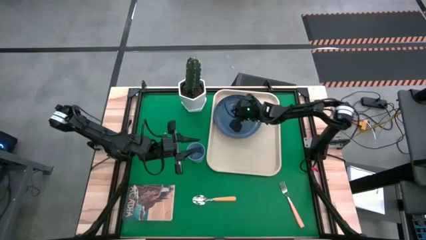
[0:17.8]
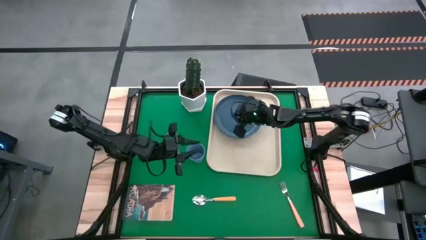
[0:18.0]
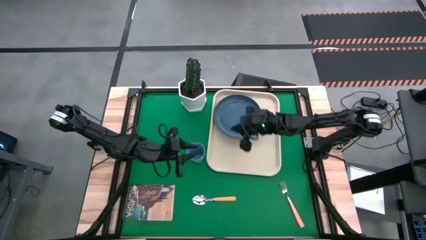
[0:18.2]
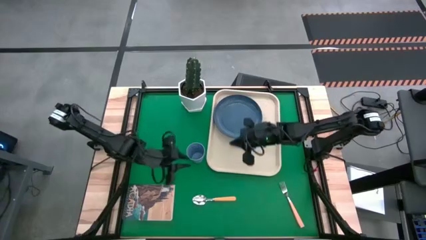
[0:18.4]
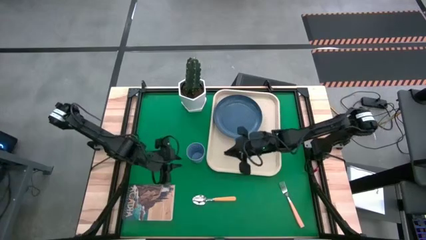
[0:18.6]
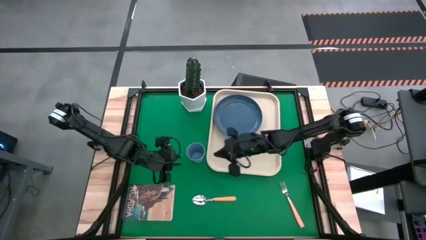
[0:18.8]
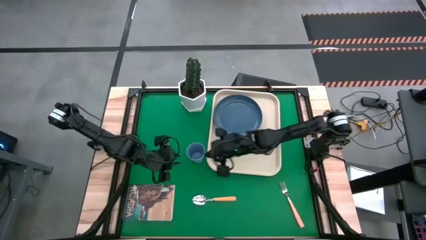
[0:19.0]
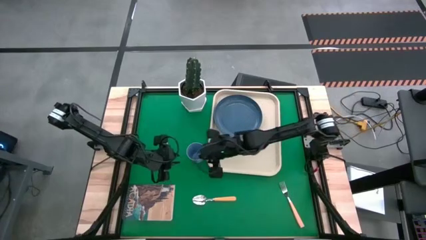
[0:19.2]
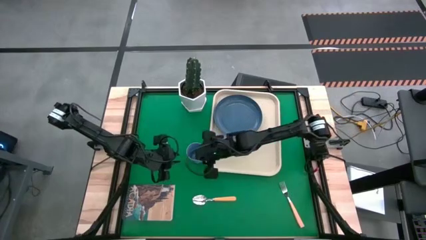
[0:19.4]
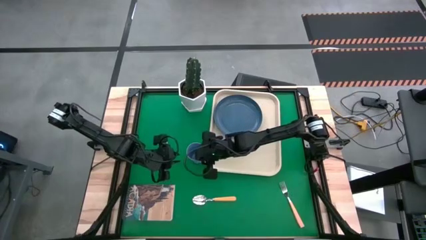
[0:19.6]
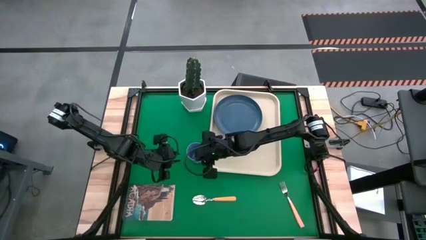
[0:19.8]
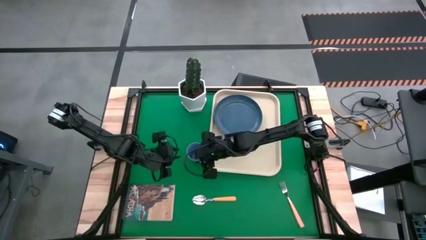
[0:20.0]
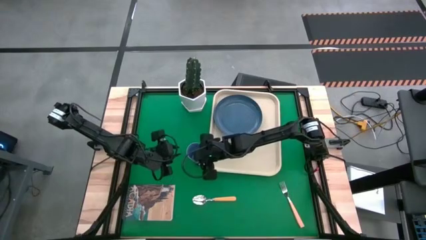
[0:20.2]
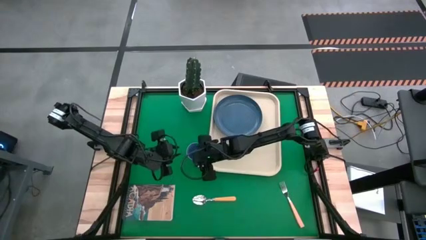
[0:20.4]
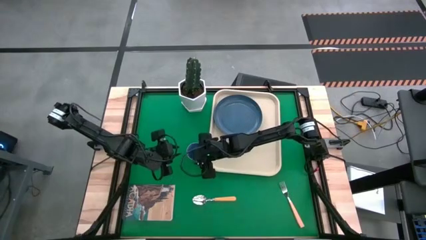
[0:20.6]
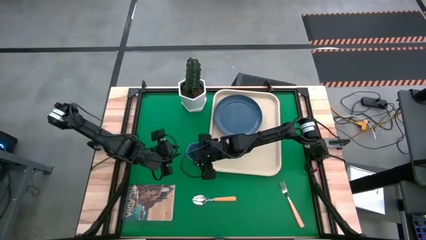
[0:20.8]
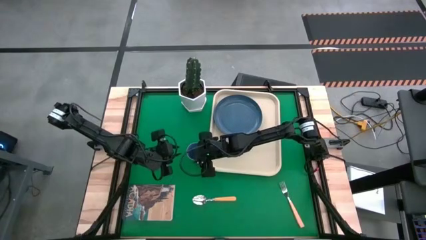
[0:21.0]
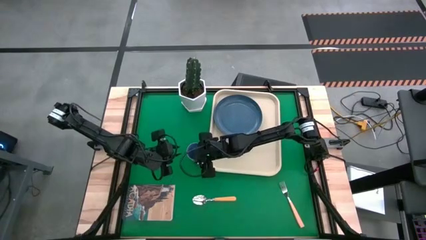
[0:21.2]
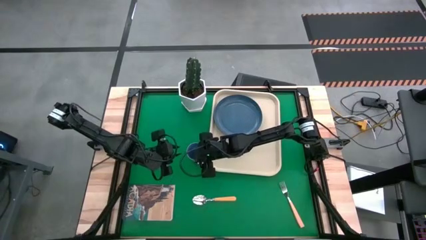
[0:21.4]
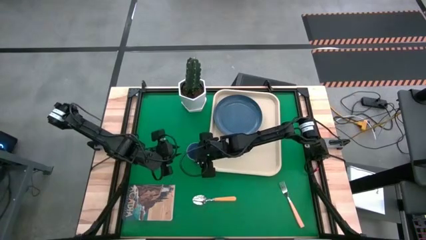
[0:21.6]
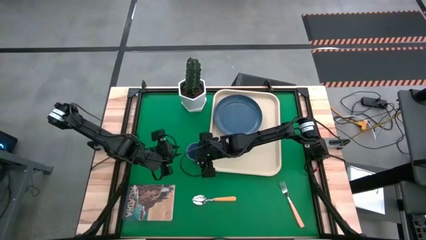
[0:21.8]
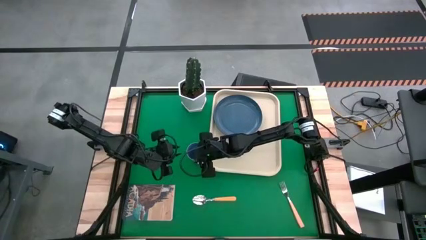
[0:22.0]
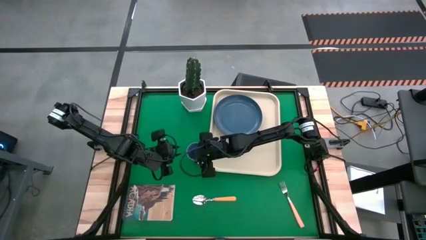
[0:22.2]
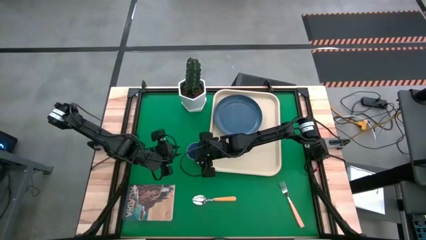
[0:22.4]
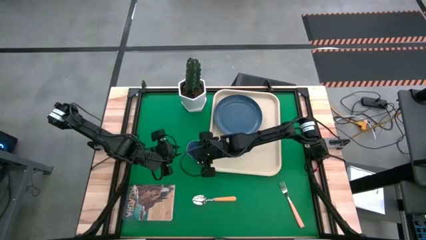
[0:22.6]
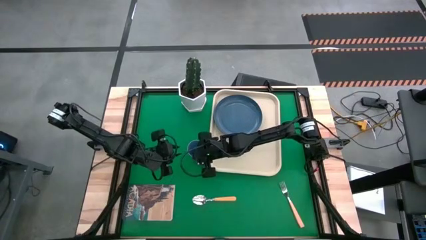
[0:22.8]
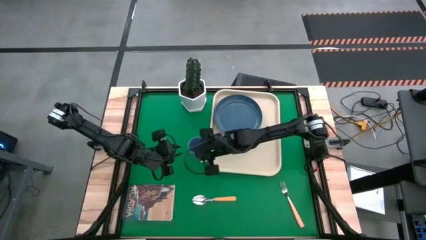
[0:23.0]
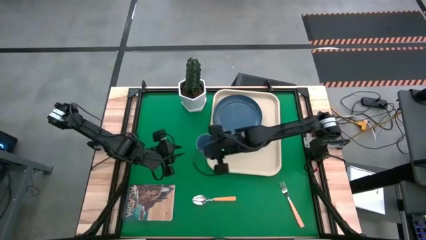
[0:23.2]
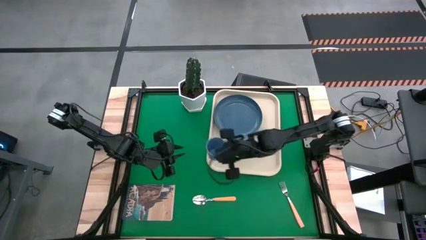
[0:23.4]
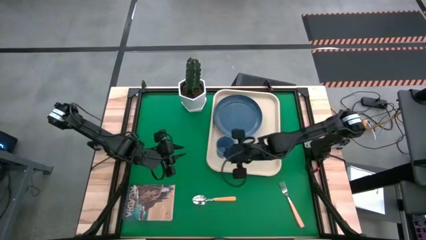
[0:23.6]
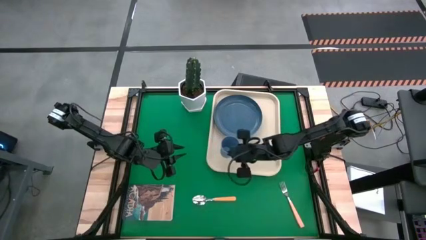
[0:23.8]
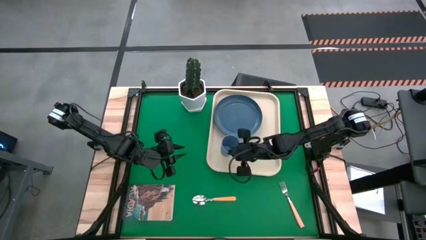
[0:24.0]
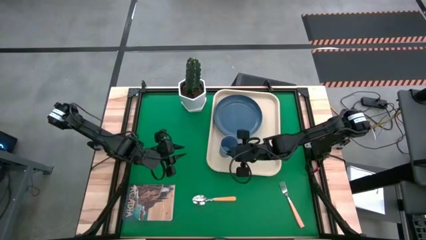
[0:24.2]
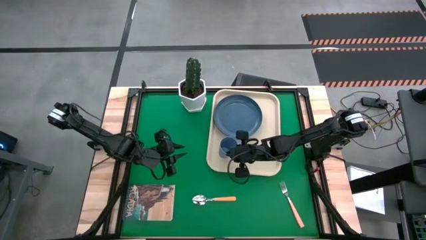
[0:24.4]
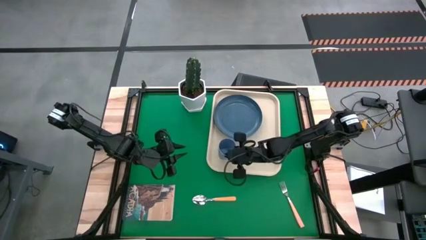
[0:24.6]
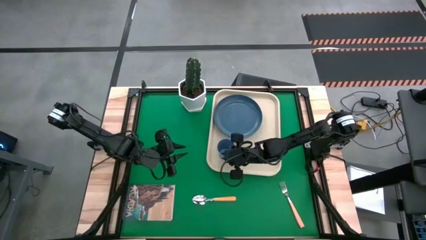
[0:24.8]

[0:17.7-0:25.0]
Task: Pick and place plate/cup/fork/spoon on tray
Put the blue cup on the white serving tray at the bottom of the blue plate

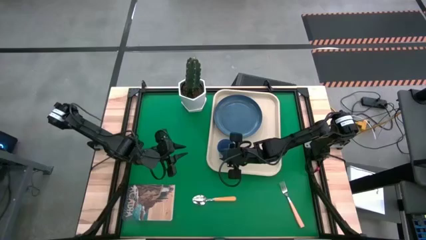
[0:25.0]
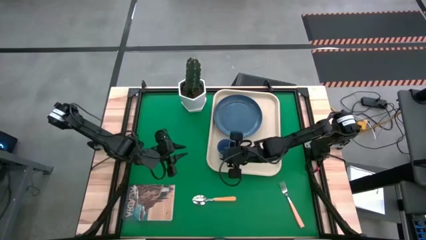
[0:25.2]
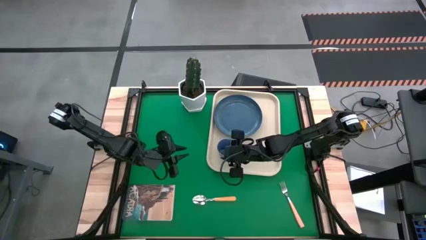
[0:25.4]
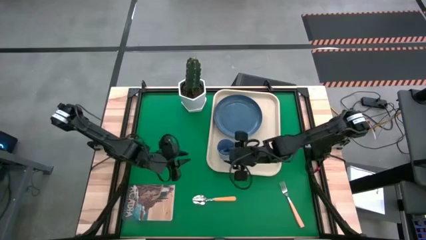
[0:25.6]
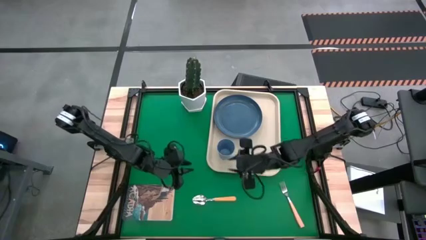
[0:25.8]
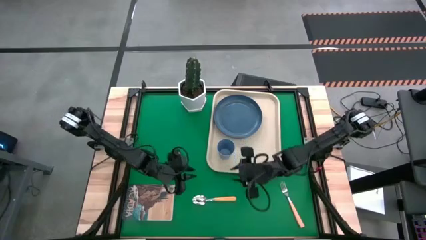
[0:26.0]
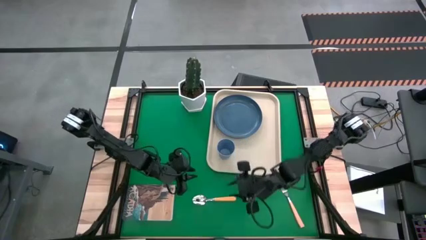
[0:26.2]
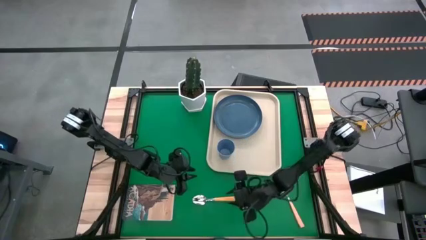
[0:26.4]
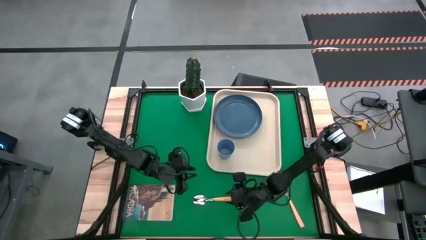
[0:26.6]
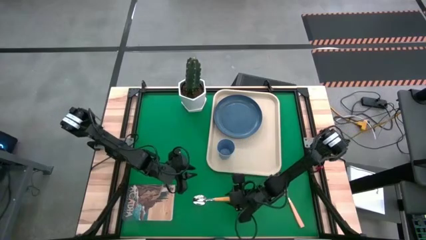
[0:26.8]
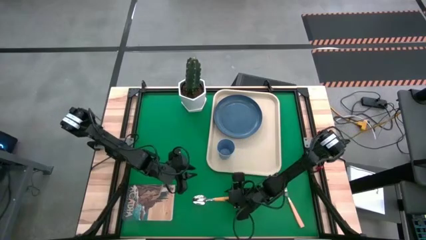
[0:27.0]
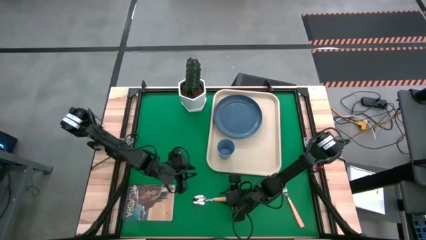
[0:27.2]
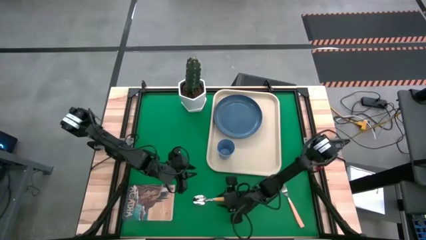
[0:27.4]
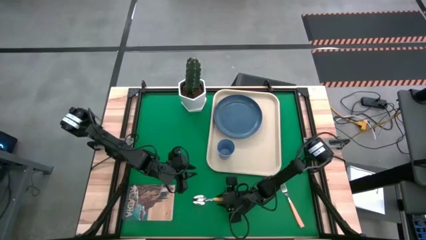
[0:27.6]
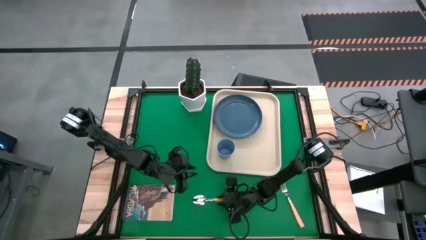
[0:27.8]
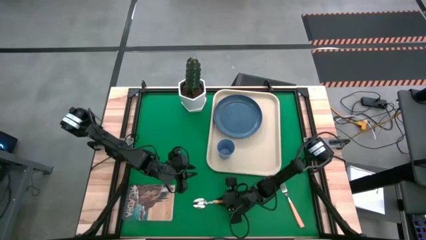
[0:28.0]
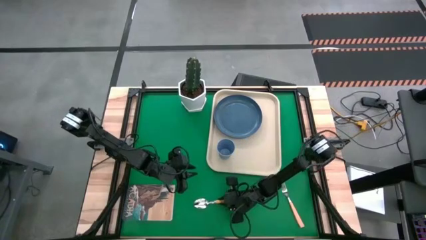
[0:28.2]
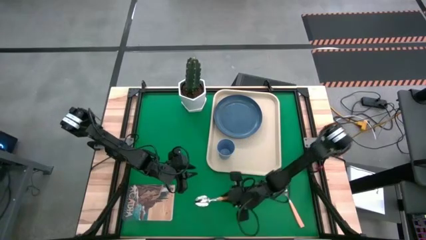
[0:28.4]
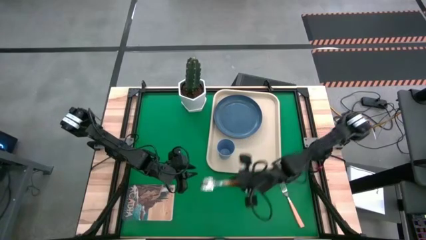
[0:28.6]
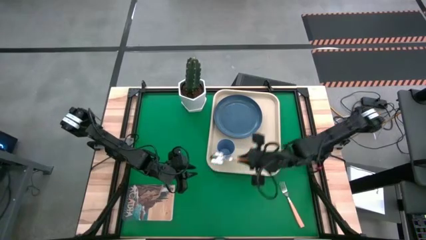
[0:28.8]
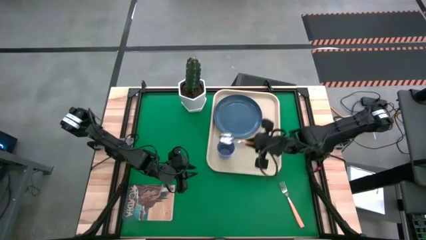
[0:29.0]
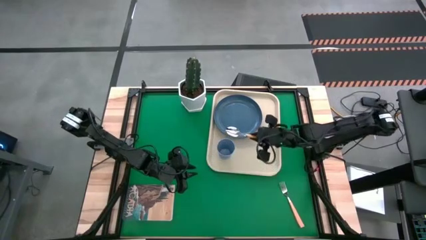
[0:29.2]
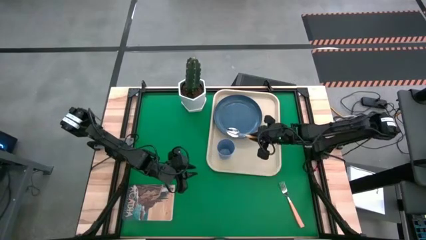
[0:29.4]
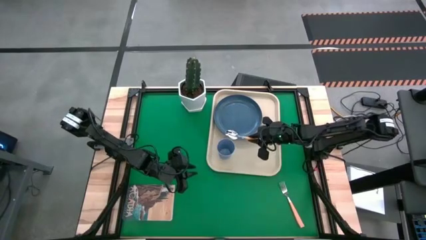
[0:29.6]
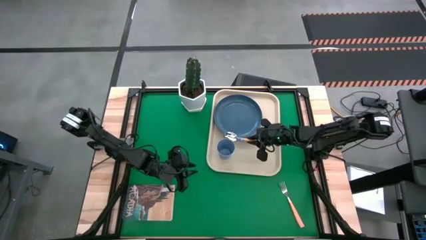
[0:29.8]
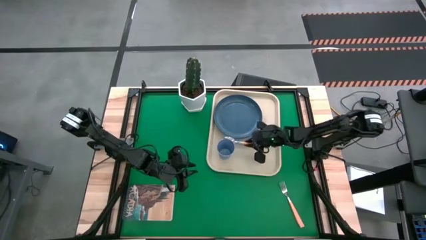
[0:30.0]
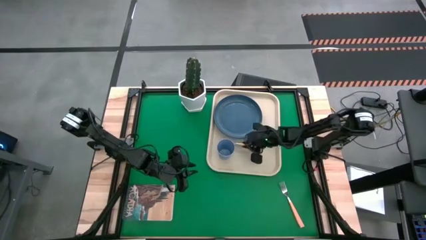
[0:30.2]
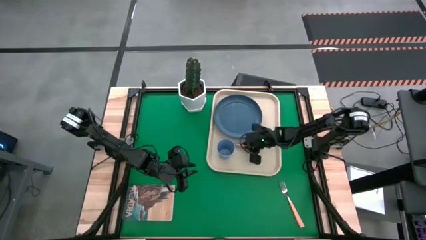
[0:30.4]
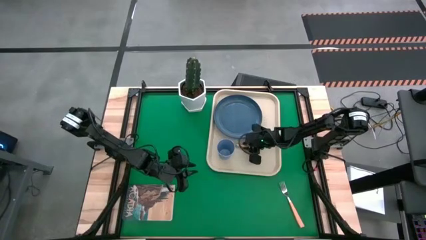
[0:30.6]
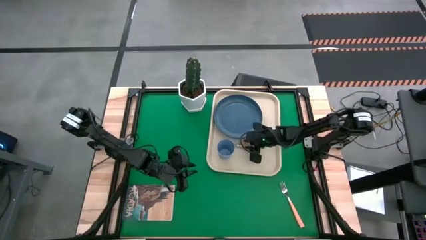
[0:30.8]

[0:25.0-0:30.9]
Put the yellow spoon on the white serving tray at the bottom of the blue plate
